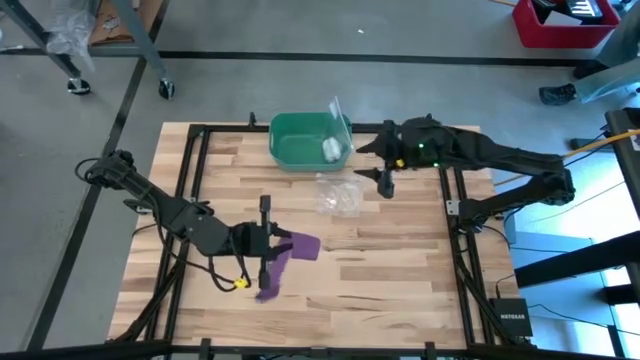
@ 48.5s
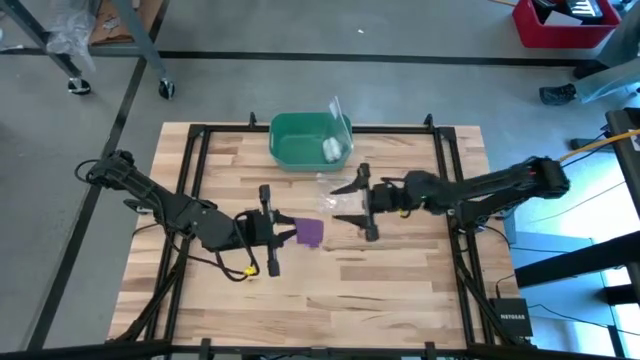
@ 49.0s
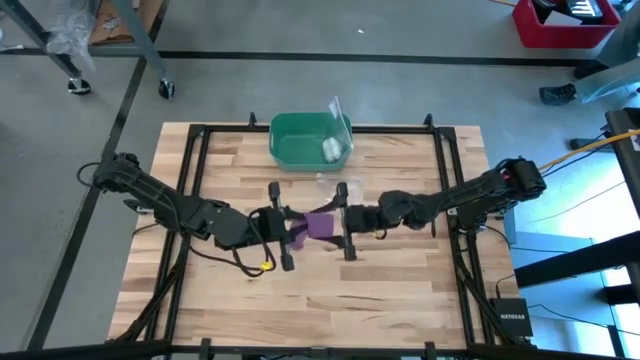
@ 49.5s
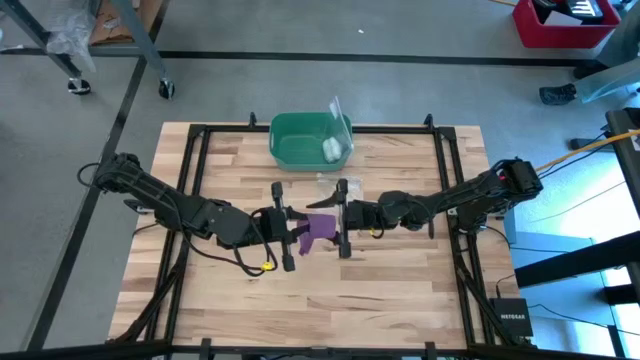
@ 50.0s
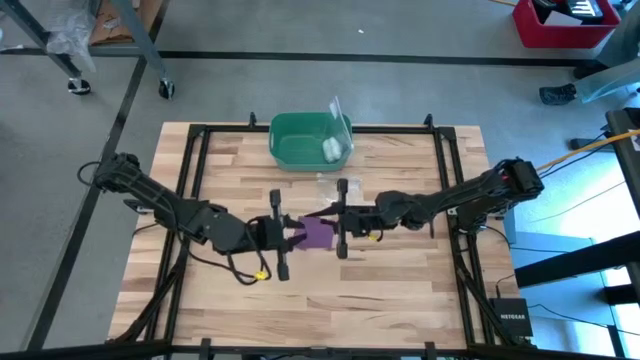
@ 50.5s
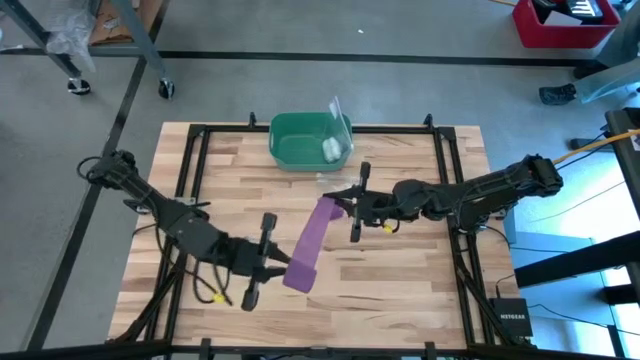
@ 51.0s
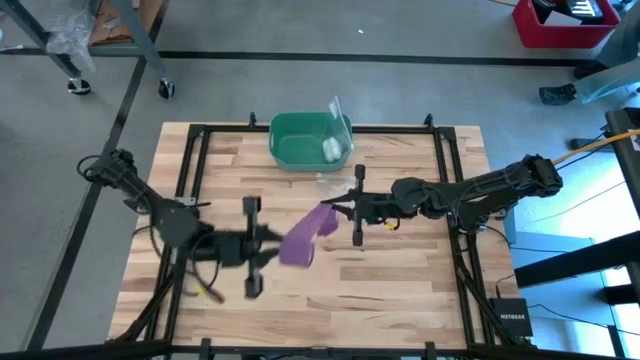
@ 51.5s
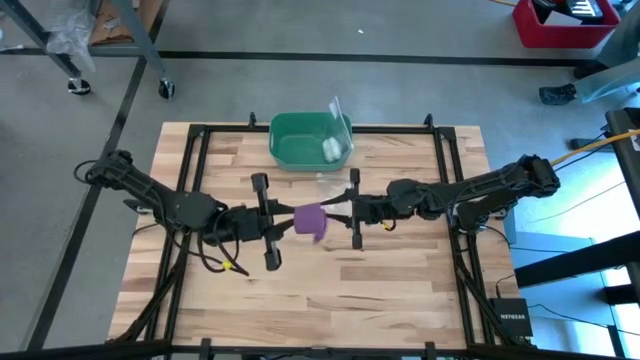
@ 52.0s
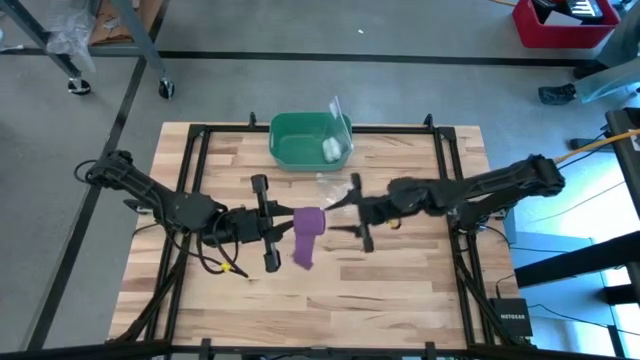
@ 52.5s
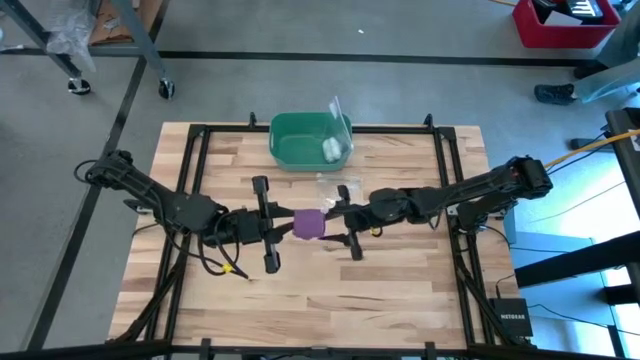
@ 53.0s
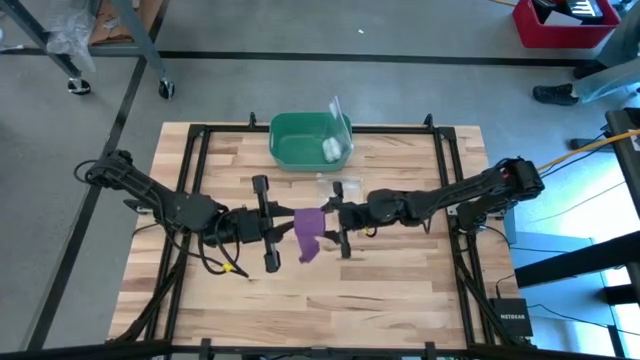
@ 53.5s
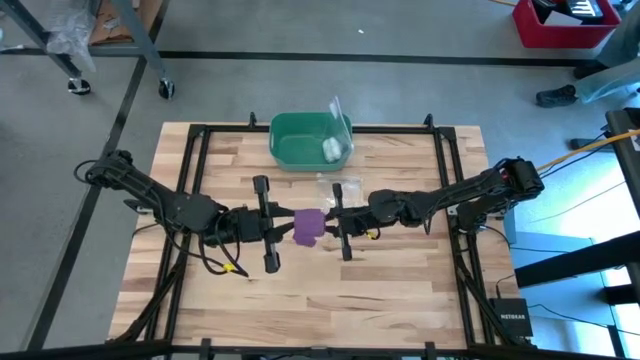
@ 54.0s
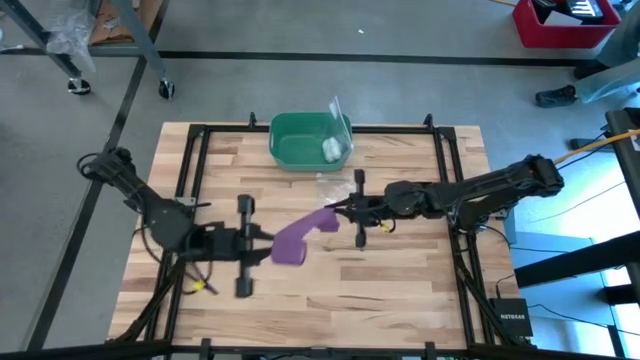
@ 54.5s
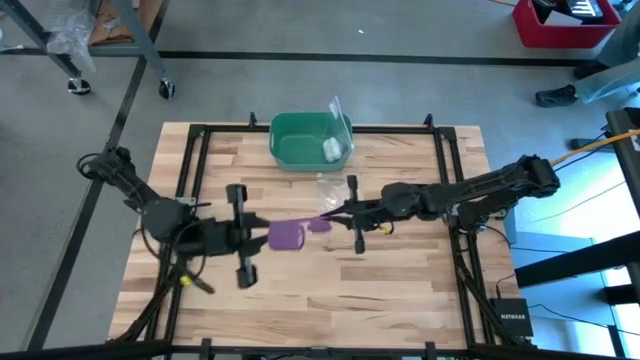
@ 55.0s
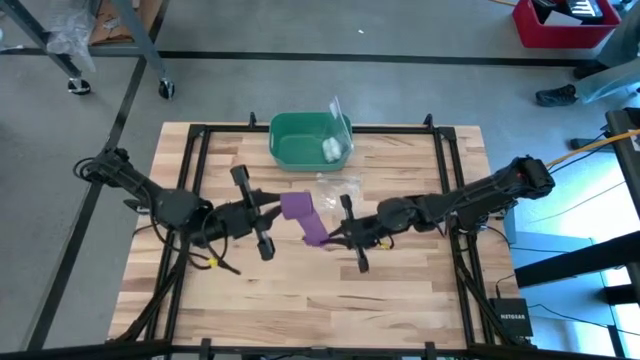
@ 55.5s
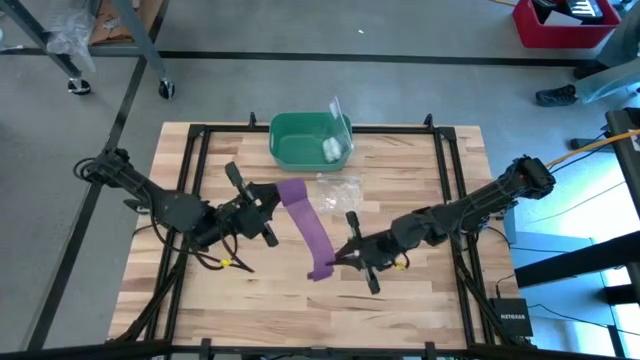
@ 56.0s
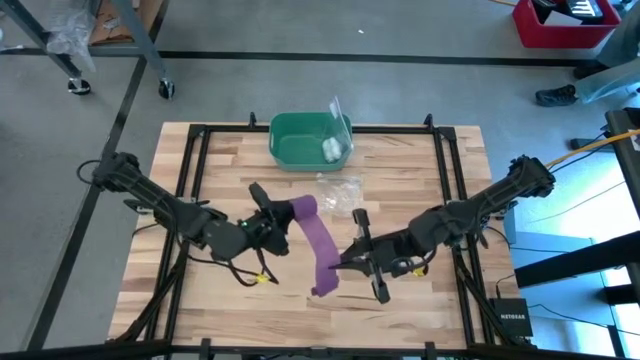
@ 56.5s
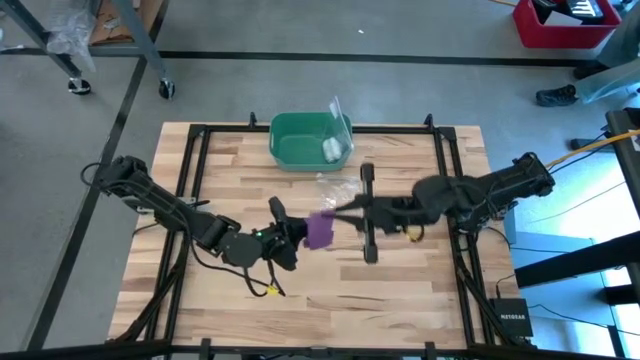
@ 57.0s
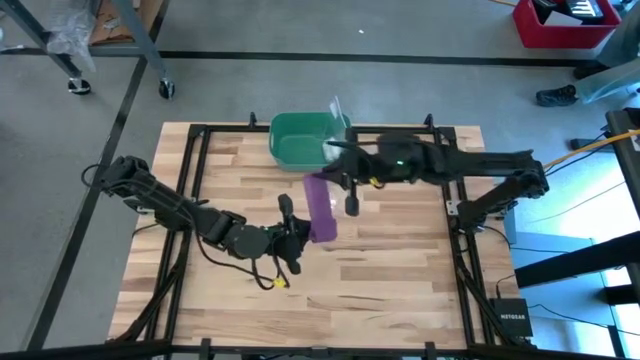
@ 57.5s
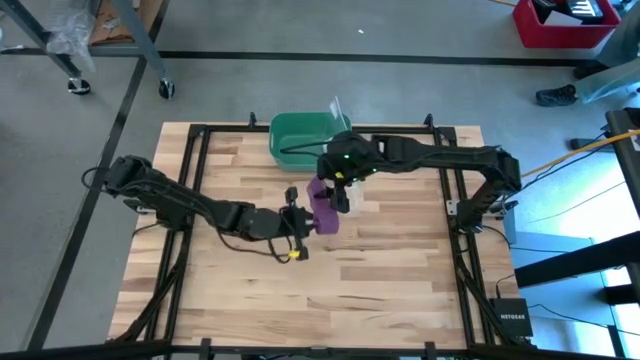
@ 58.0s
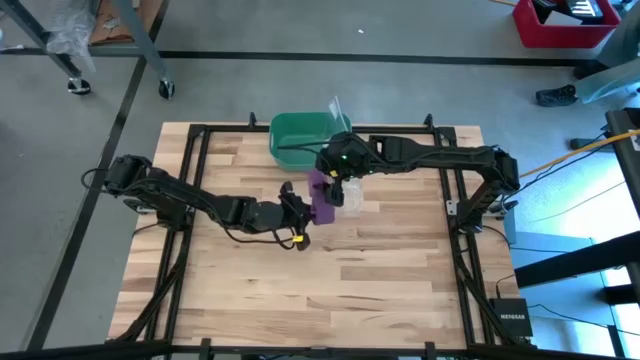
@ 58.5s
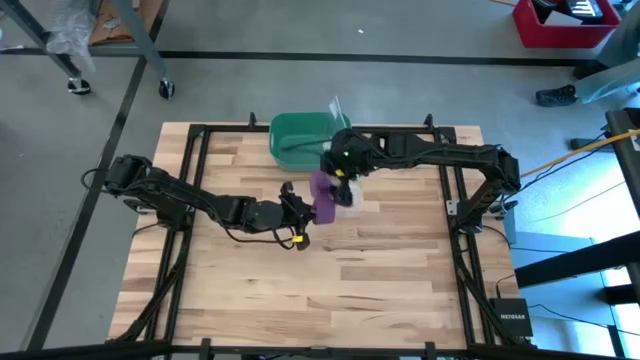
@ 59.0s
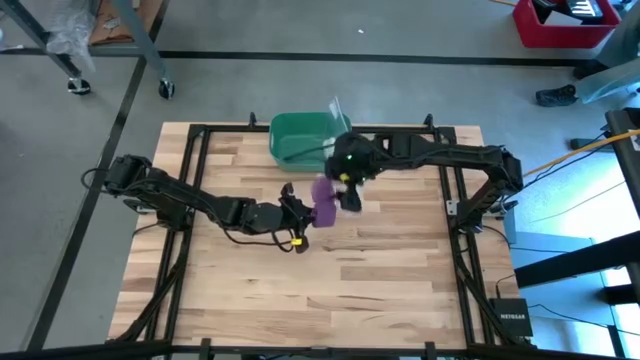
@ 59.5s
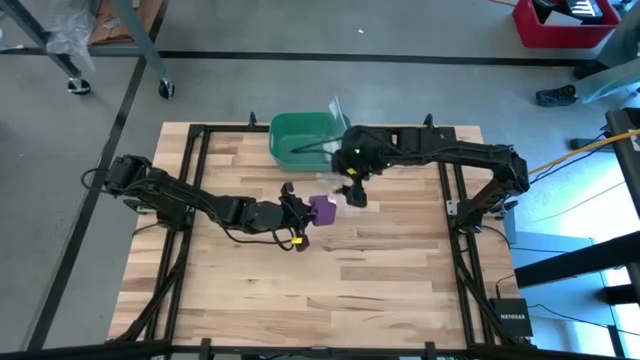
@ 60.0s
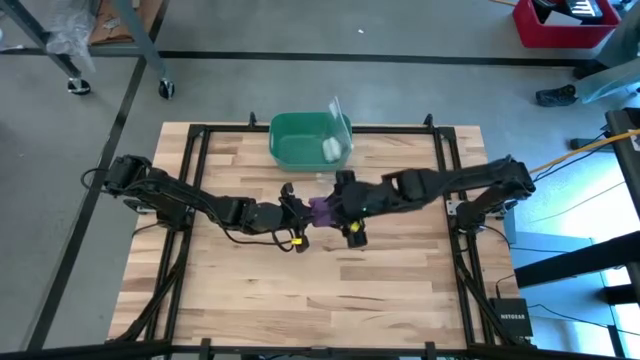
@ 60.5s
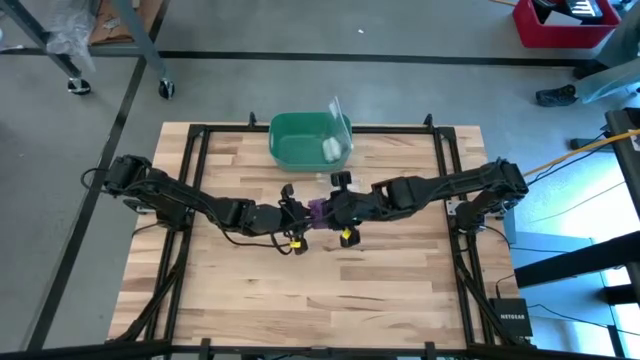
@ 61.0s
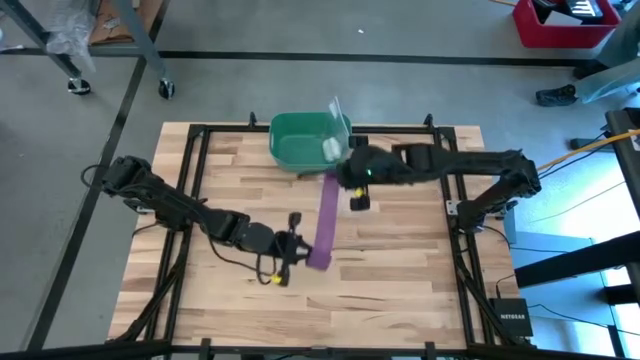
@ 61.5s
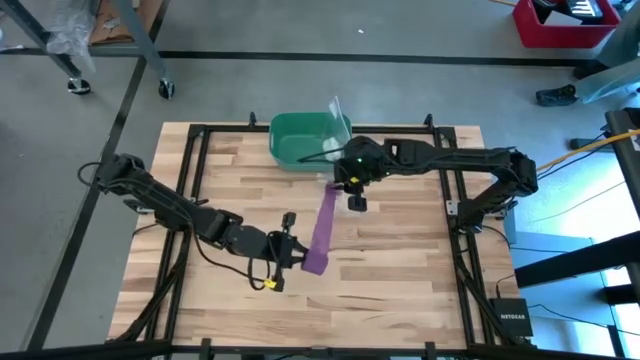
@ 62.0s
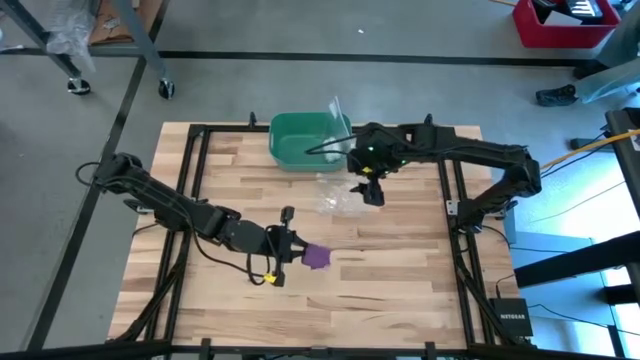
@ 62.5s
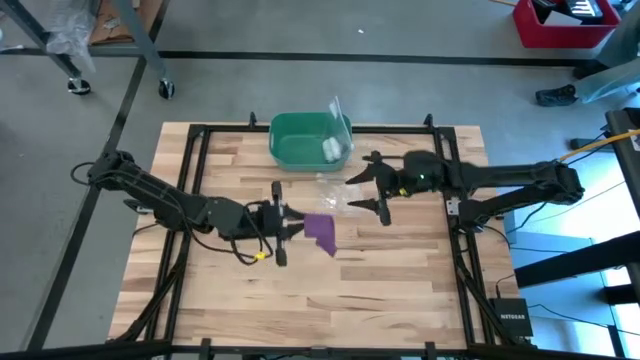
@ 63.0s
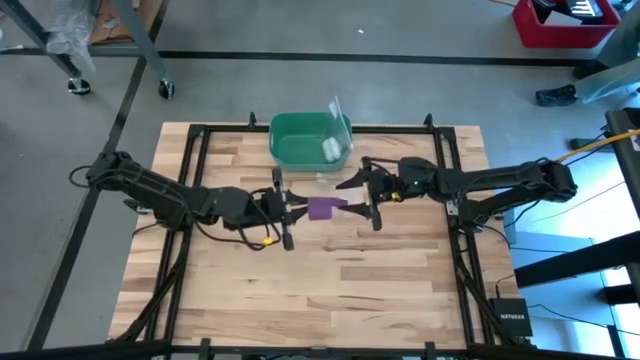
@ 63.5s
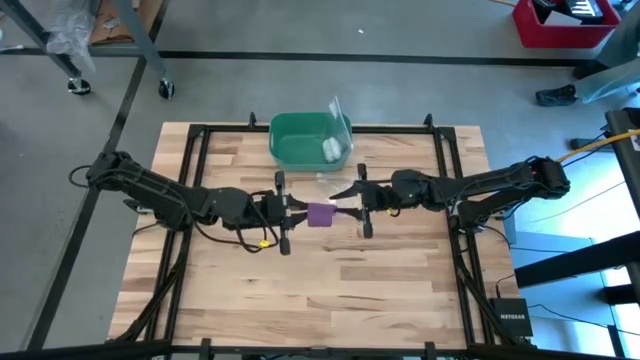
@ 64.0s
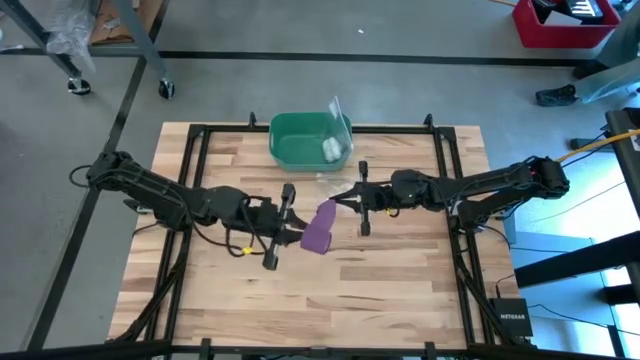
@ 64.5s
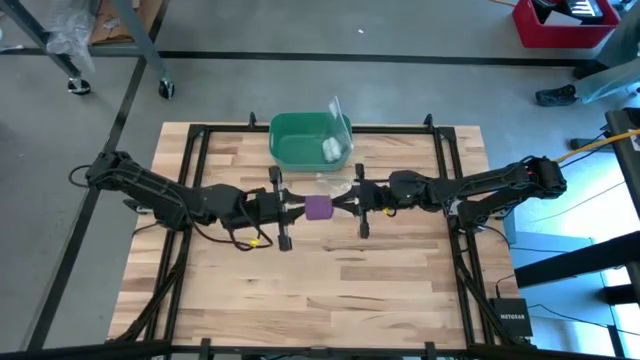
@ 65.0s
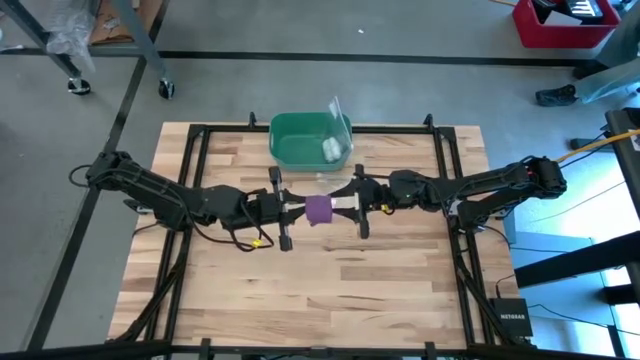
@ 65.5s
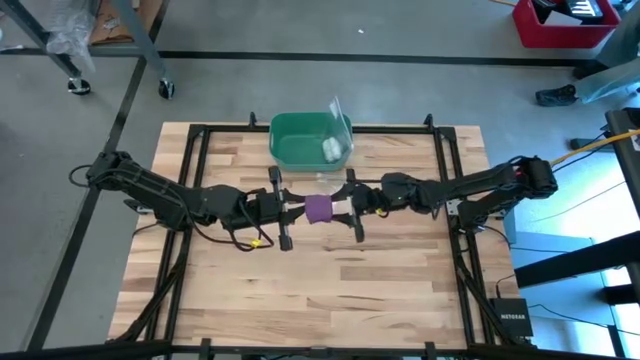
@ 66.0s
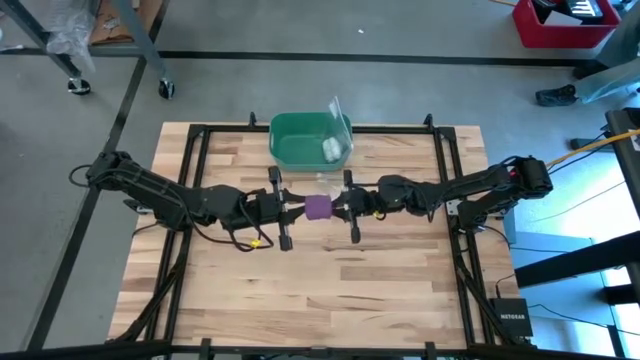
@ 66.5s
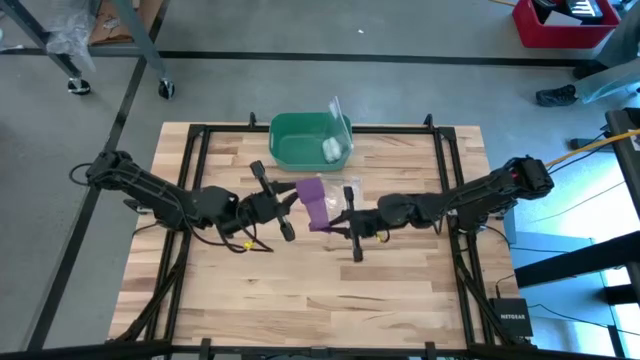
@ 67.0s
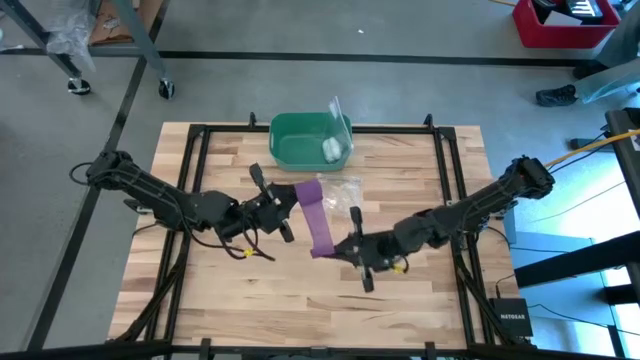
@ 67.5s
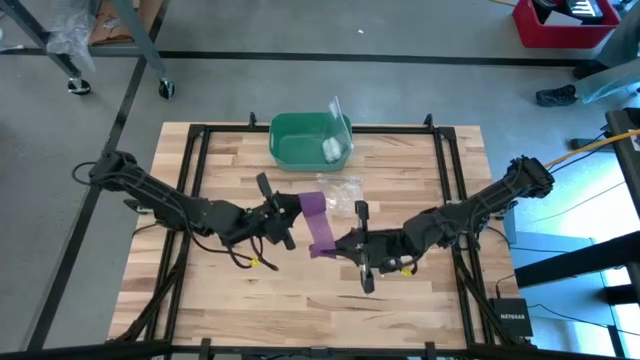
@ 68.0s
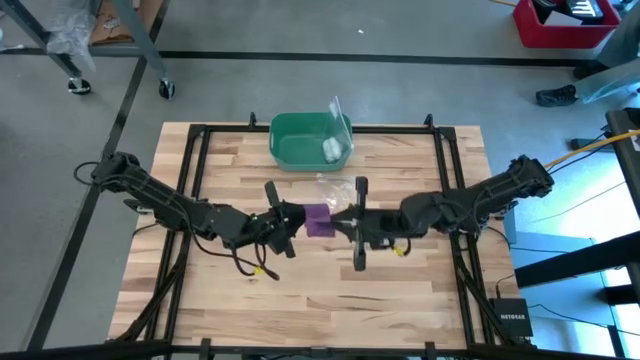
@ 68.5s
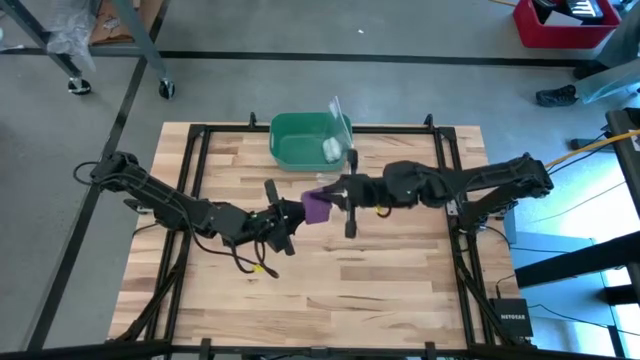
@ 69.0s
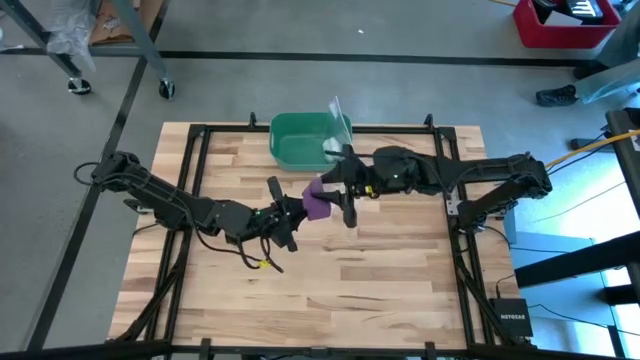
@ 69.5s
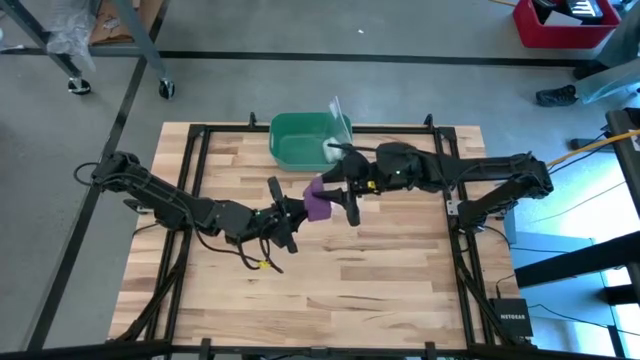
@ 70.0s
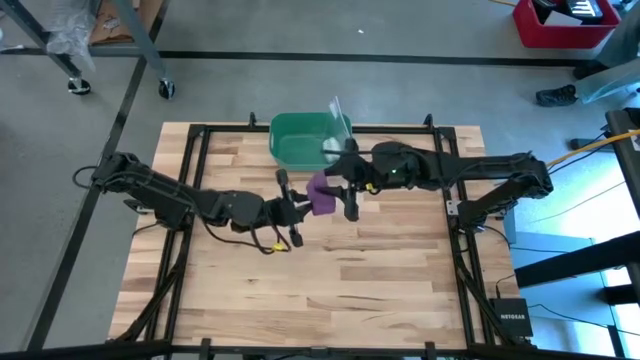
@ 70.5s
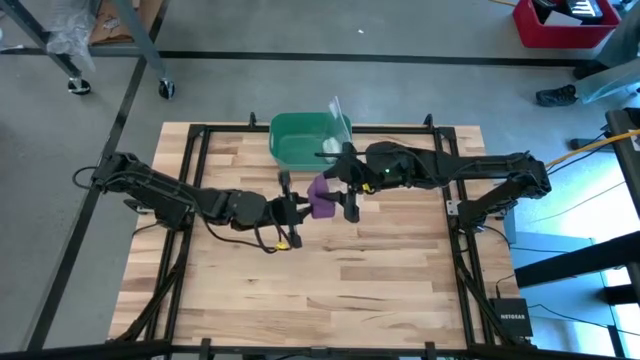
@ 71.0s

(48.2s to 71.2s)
Task: Roll bandage
Roll the violet bandage
